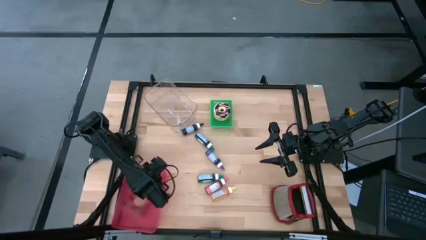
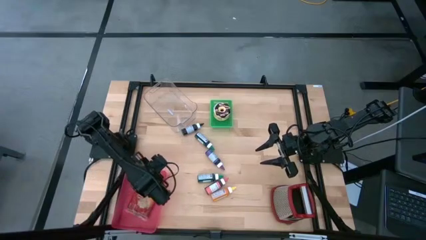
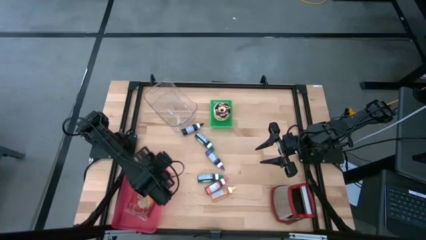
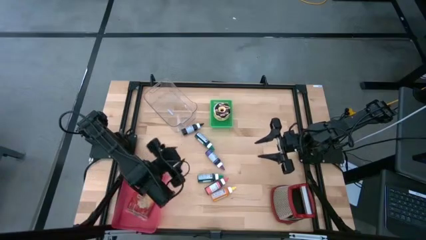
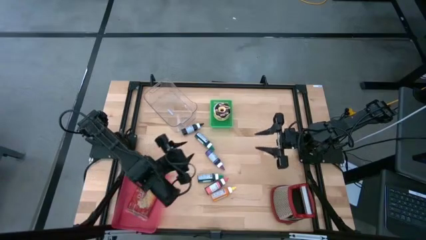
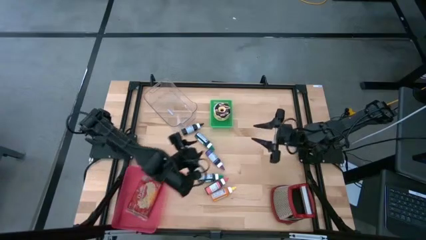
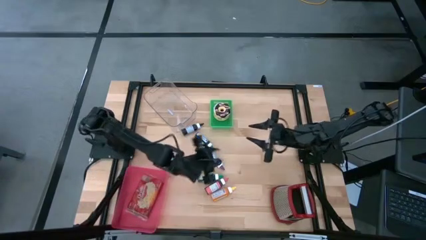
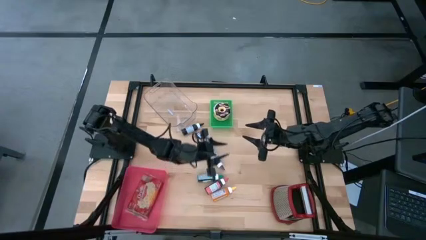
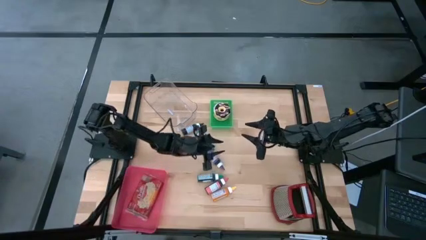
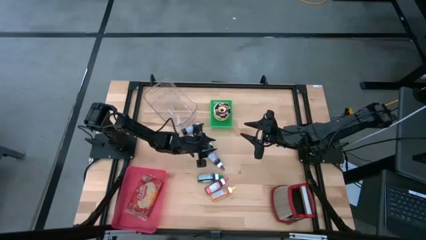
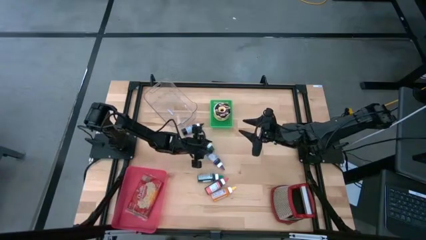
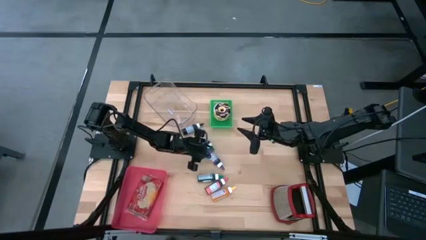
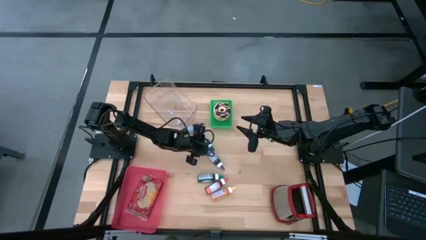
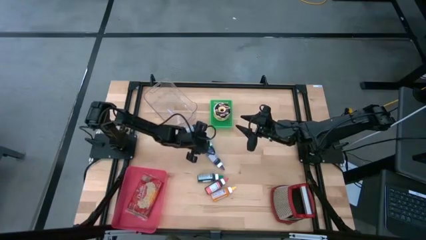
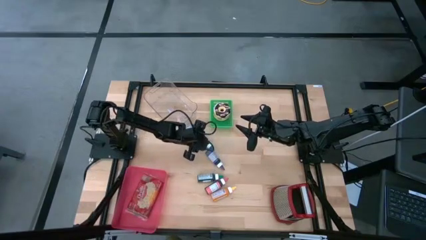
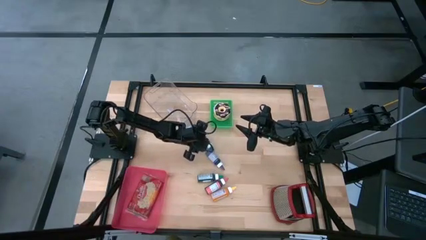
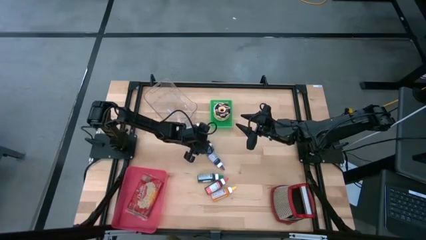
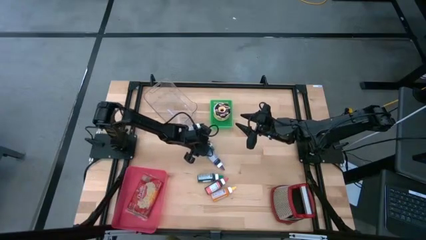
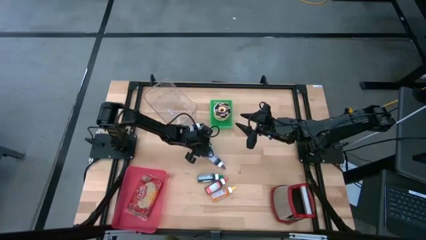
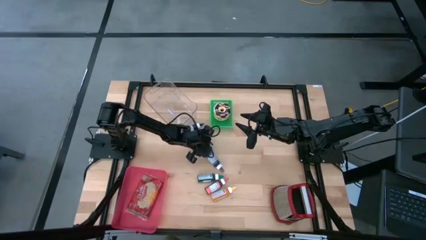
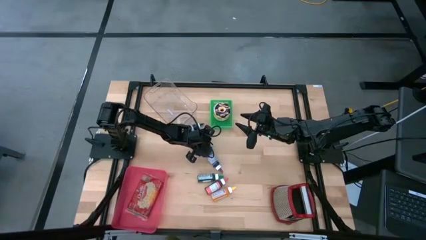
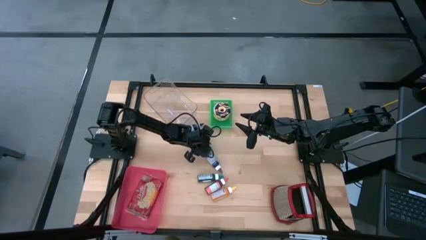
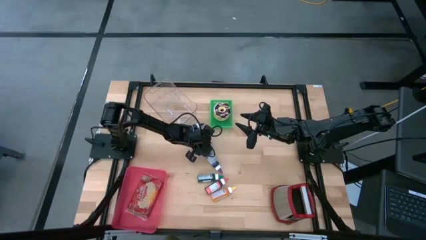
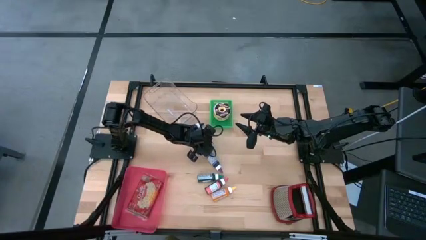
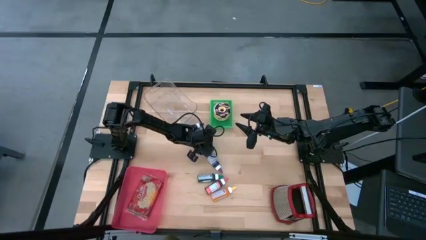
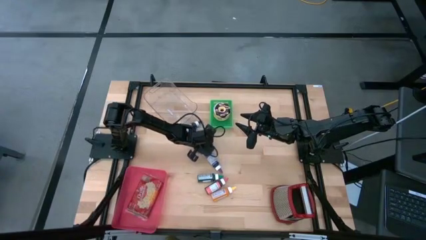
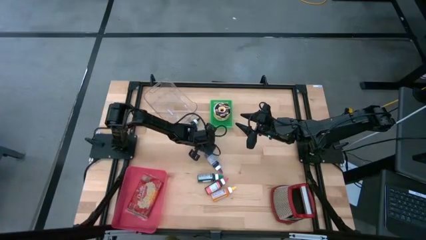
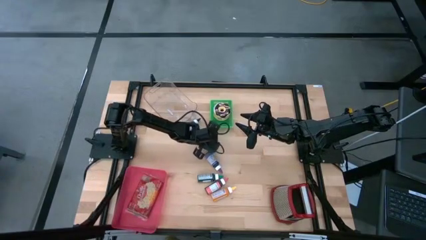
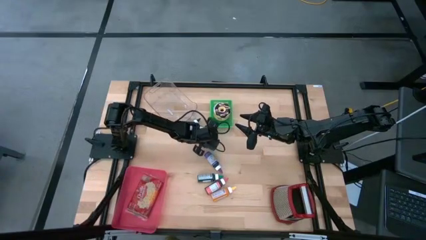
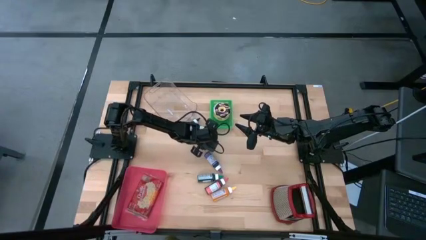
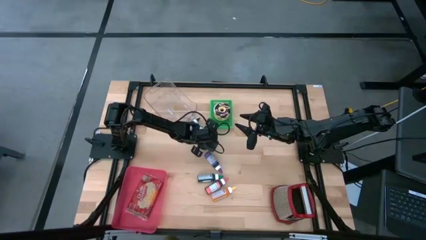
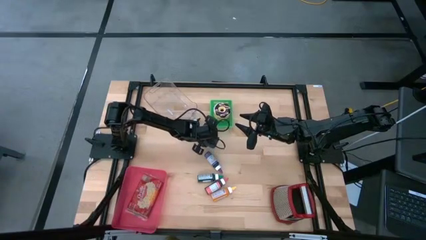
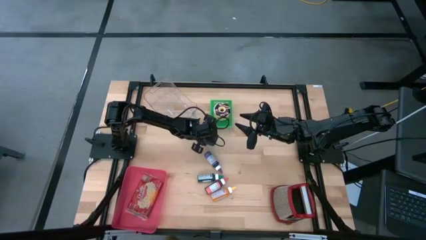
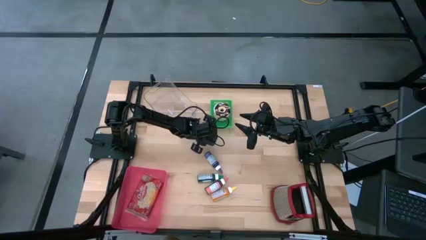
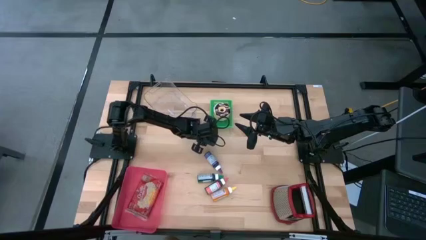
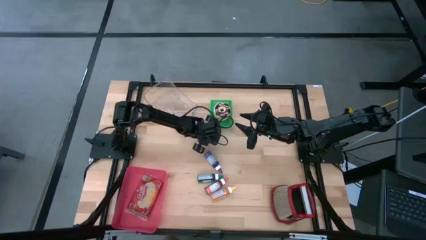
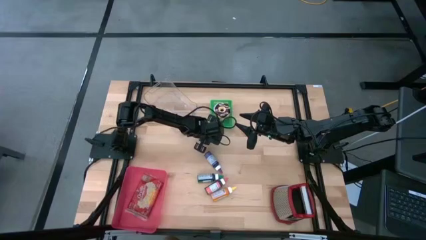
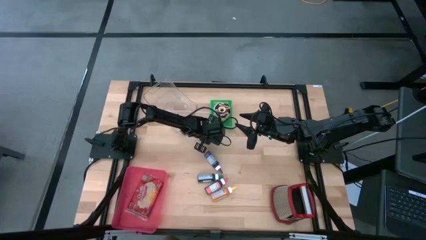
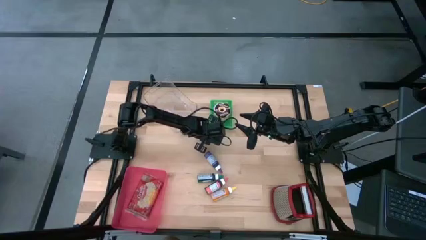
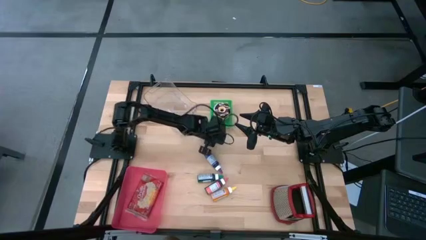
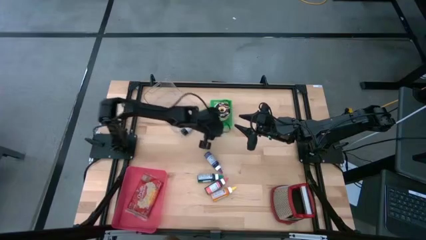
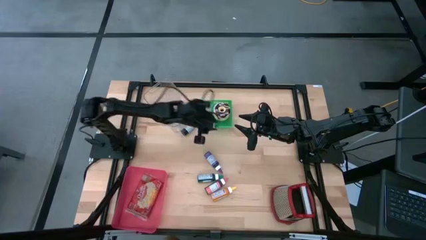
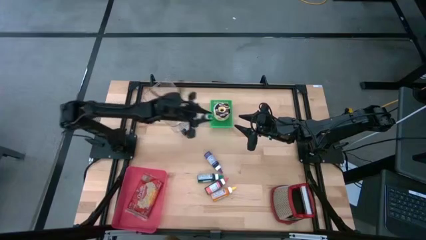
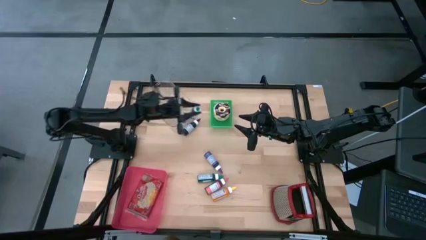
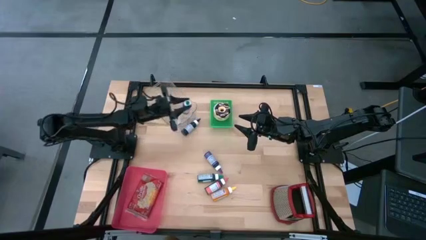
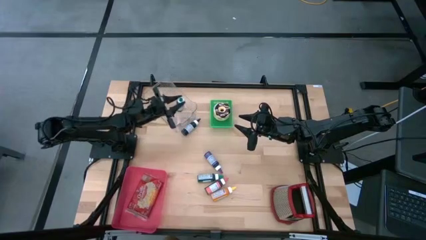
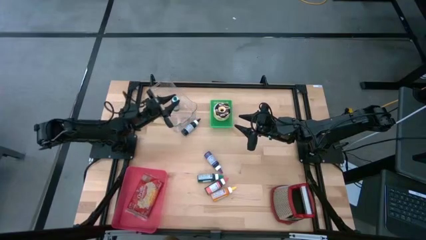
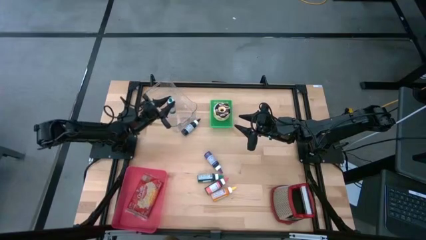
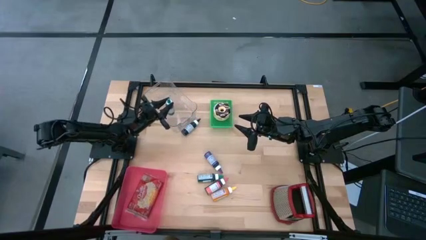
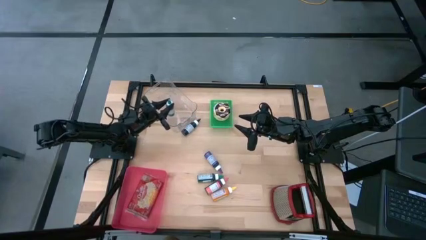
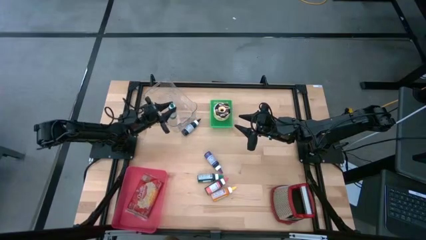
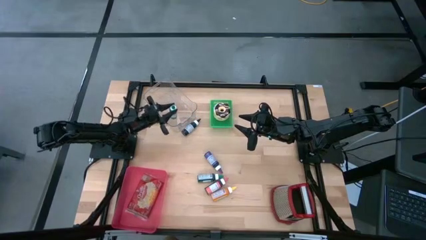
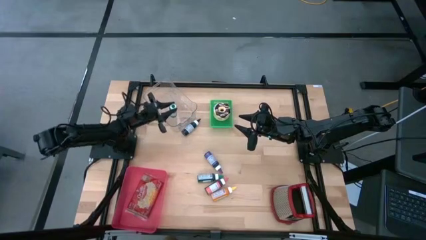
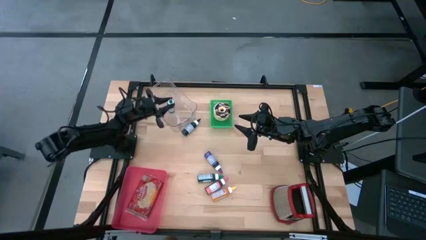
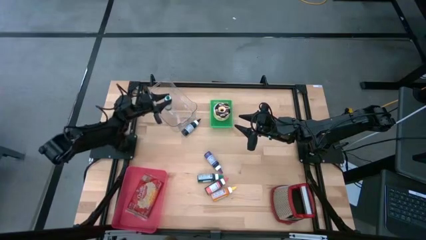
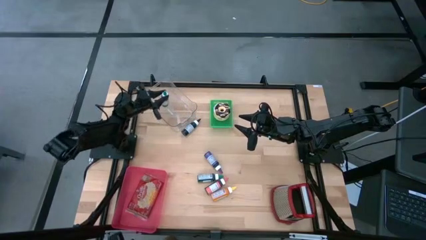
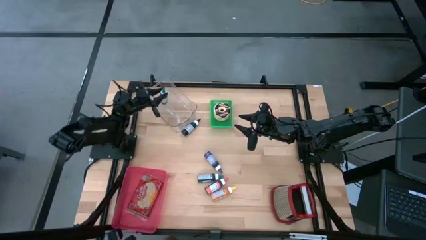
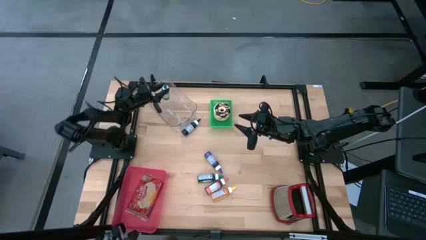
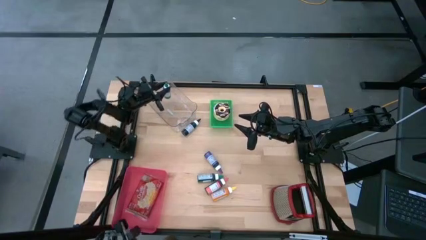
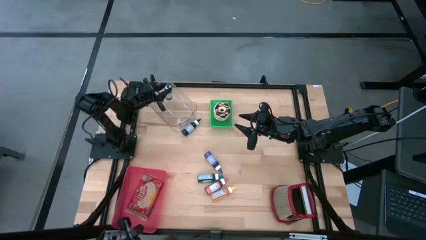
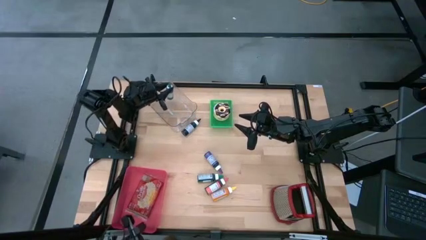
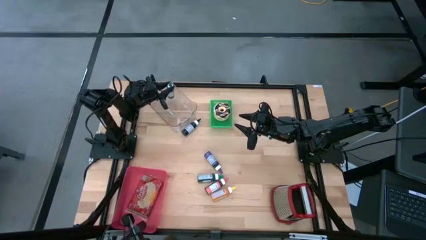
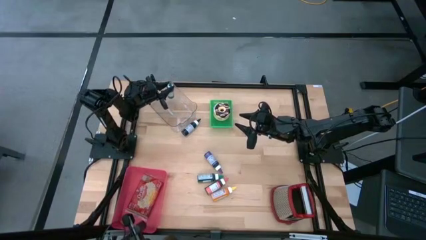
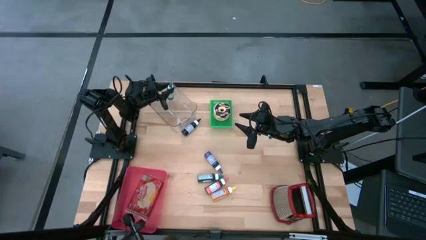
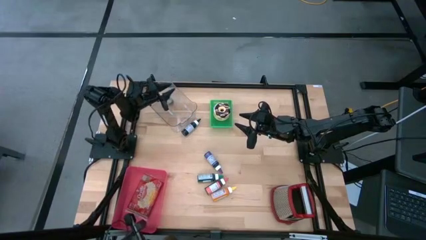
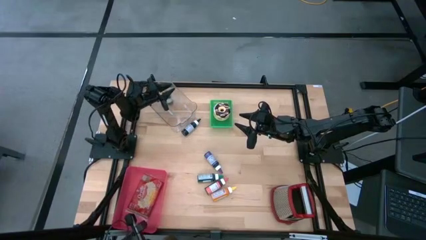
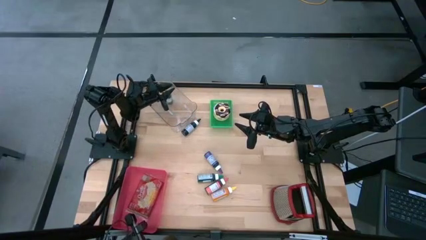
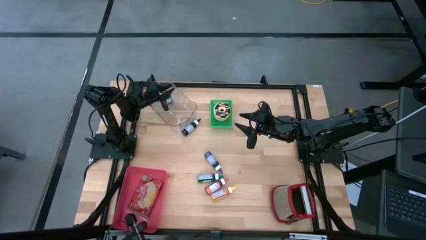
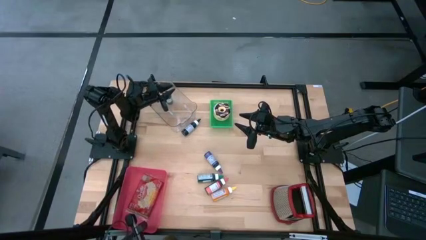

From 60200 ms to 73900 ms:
Put the top green food coloring bottle into the transparent bin
